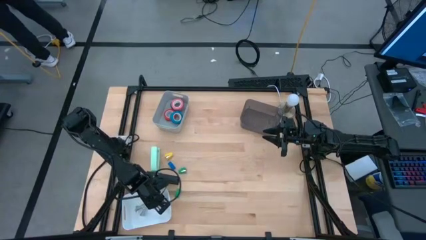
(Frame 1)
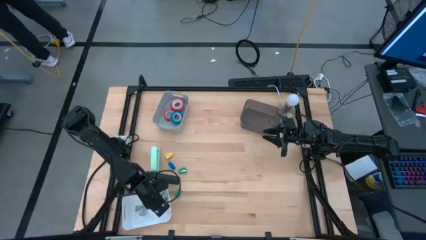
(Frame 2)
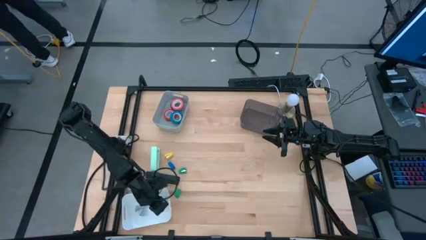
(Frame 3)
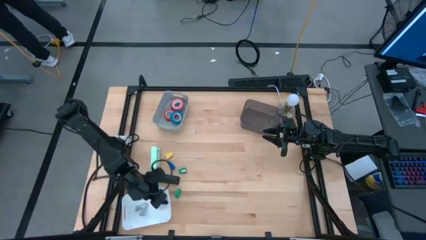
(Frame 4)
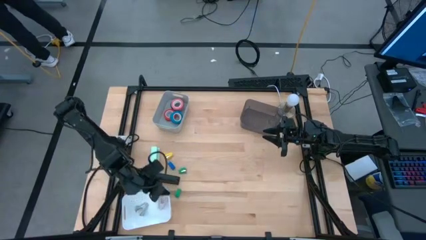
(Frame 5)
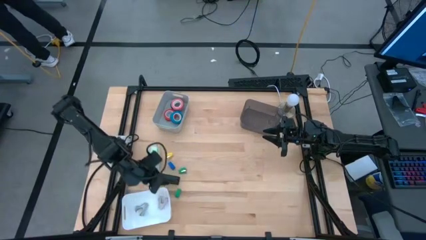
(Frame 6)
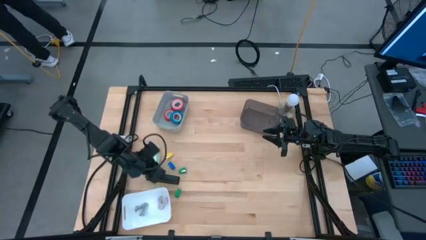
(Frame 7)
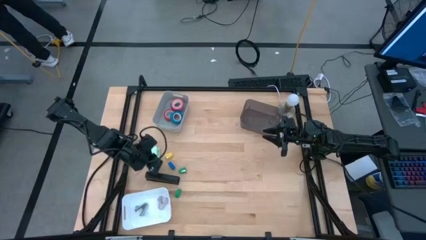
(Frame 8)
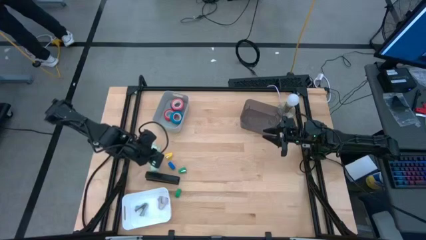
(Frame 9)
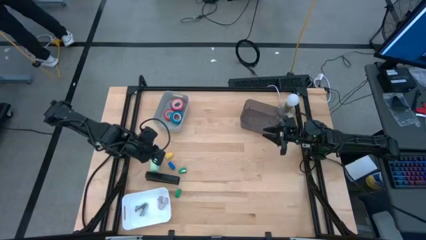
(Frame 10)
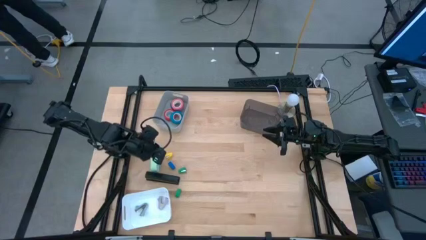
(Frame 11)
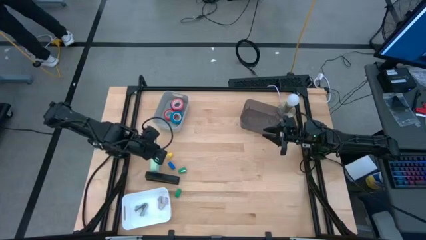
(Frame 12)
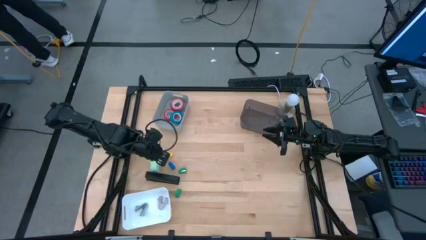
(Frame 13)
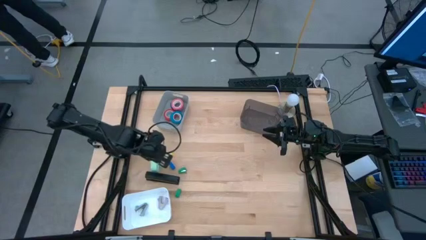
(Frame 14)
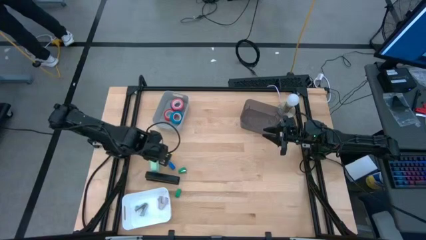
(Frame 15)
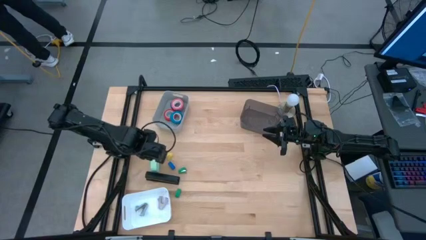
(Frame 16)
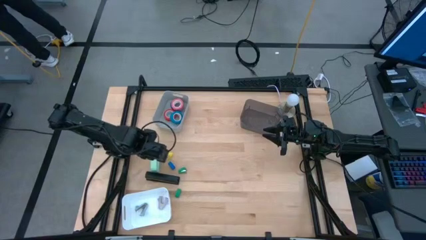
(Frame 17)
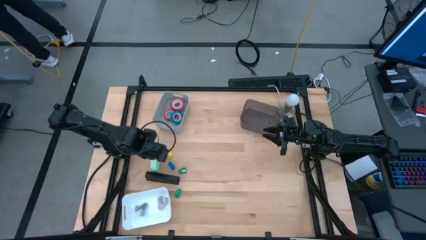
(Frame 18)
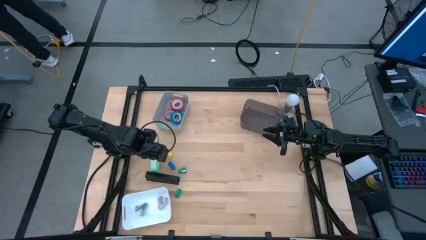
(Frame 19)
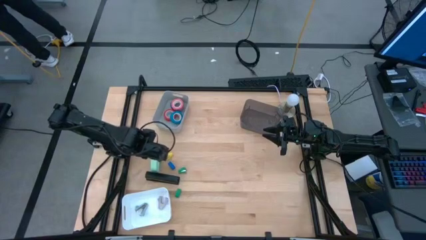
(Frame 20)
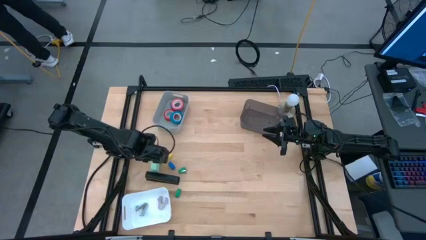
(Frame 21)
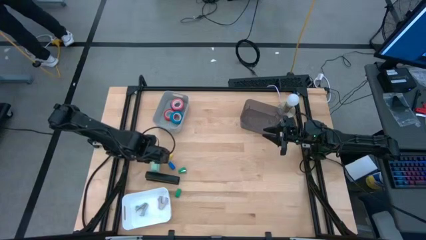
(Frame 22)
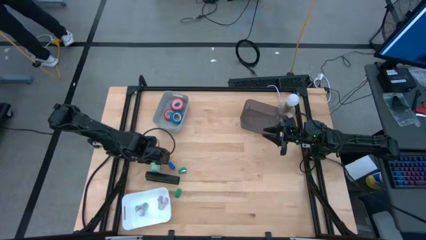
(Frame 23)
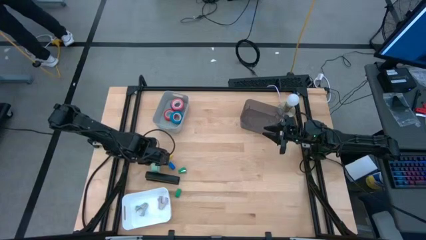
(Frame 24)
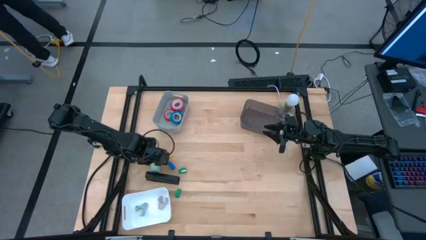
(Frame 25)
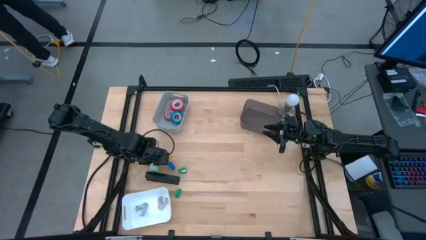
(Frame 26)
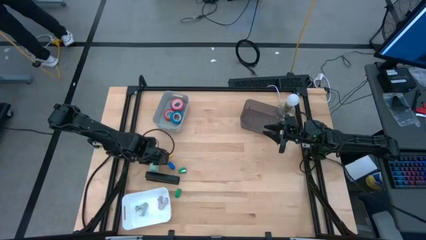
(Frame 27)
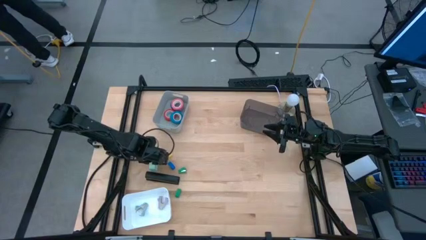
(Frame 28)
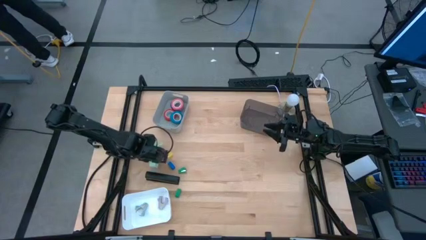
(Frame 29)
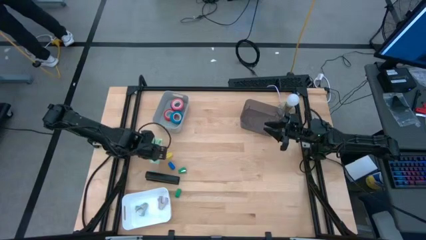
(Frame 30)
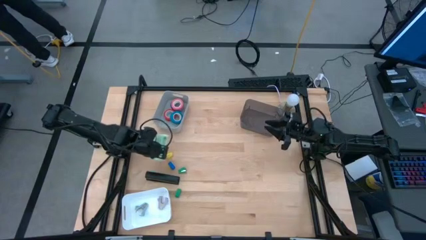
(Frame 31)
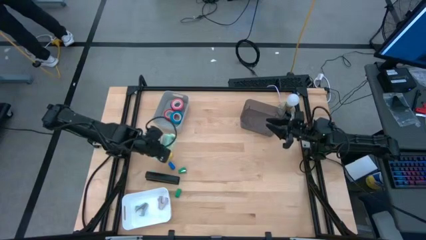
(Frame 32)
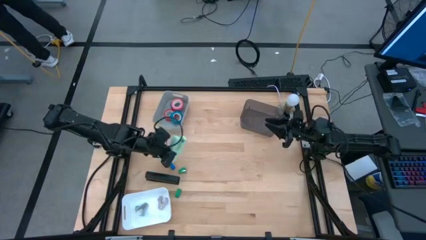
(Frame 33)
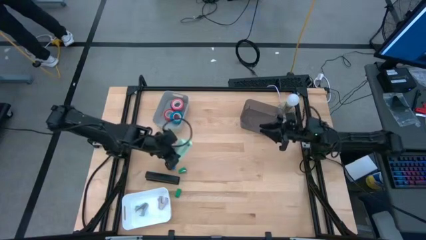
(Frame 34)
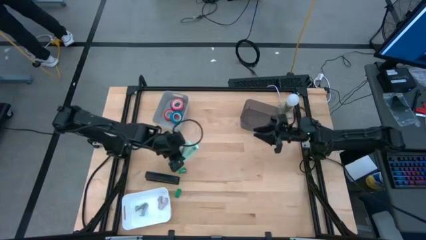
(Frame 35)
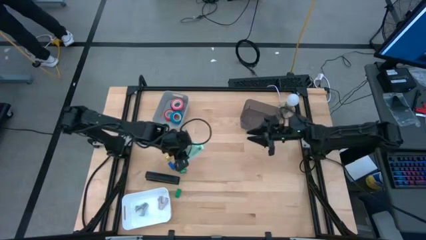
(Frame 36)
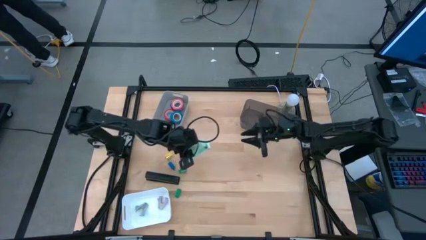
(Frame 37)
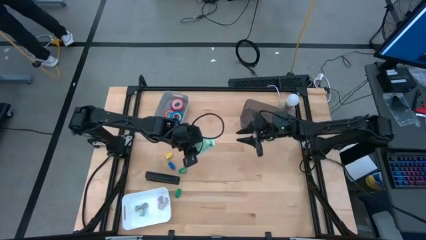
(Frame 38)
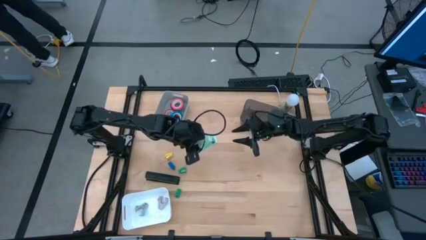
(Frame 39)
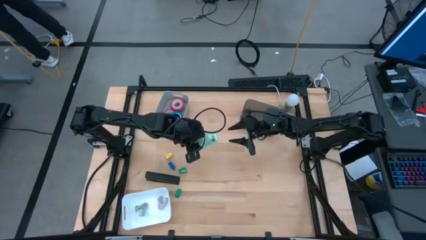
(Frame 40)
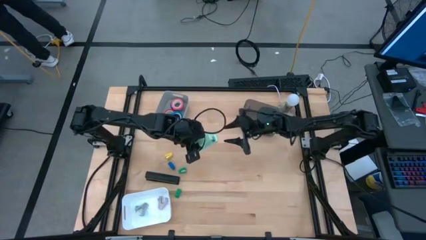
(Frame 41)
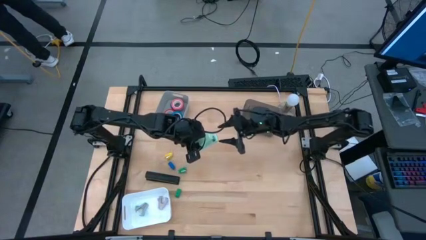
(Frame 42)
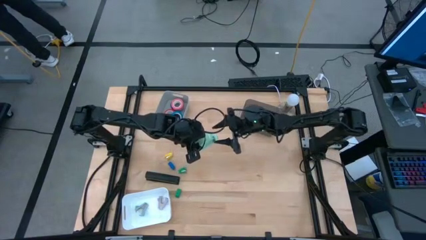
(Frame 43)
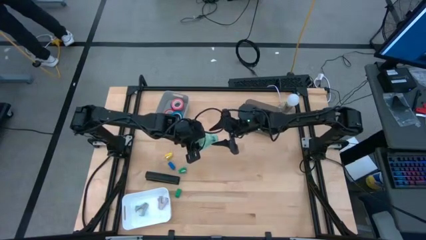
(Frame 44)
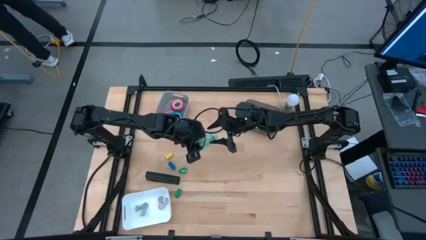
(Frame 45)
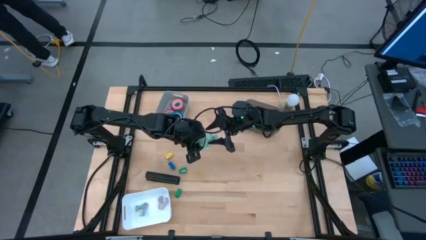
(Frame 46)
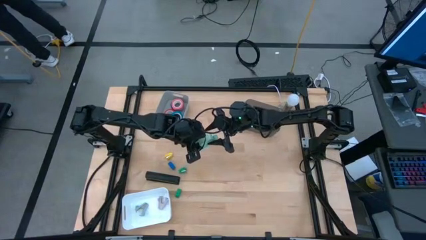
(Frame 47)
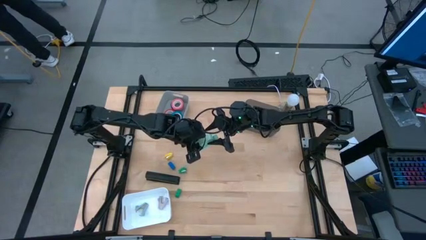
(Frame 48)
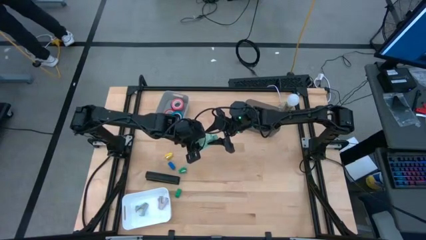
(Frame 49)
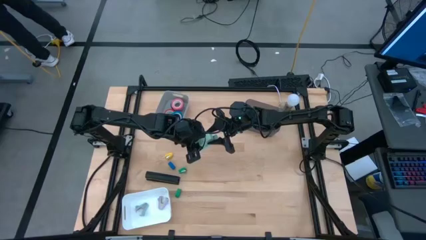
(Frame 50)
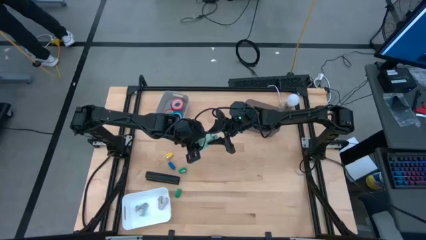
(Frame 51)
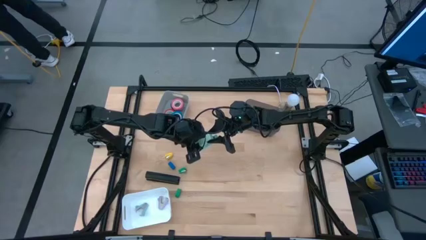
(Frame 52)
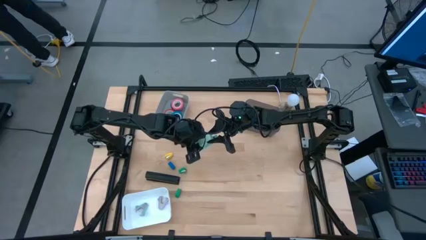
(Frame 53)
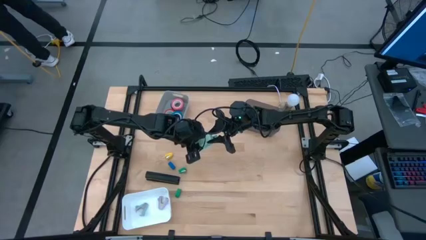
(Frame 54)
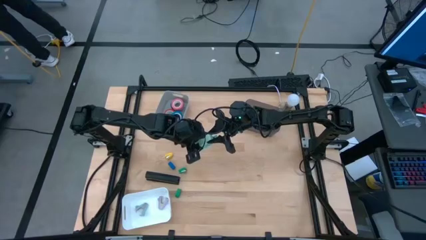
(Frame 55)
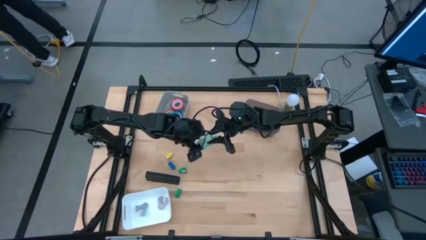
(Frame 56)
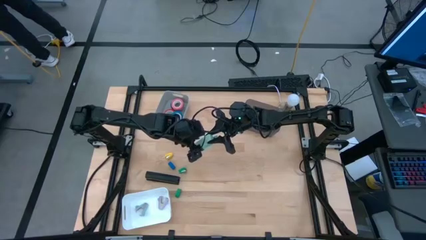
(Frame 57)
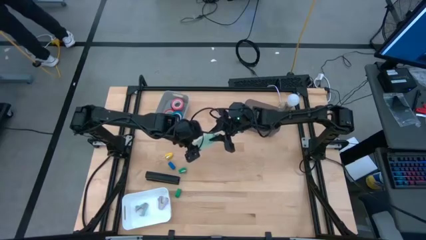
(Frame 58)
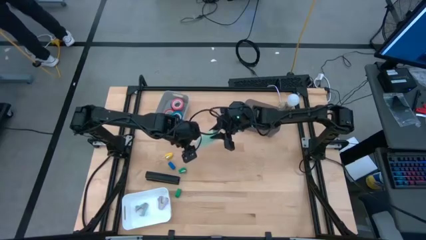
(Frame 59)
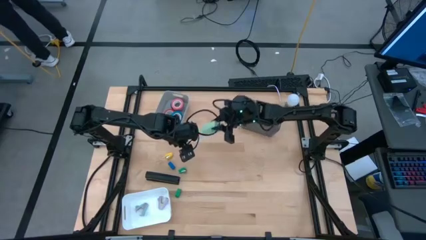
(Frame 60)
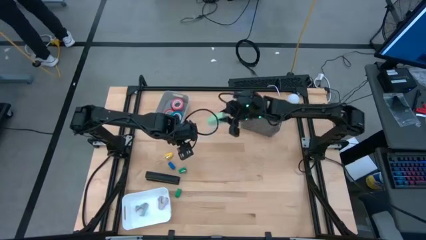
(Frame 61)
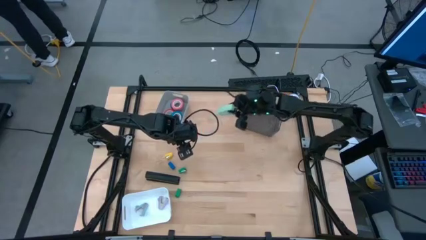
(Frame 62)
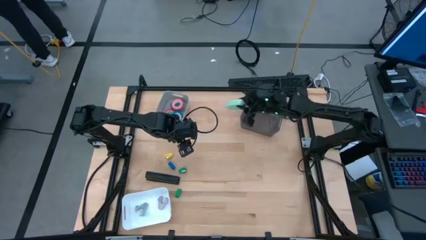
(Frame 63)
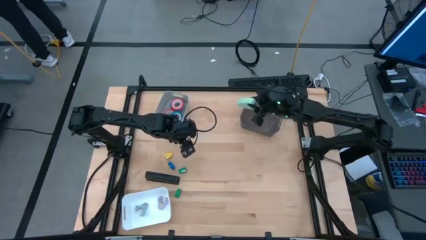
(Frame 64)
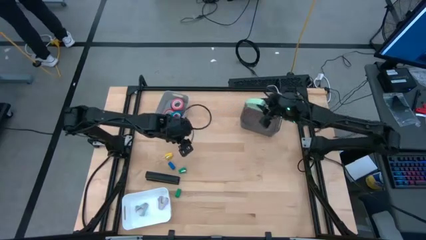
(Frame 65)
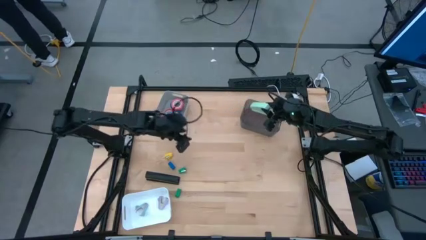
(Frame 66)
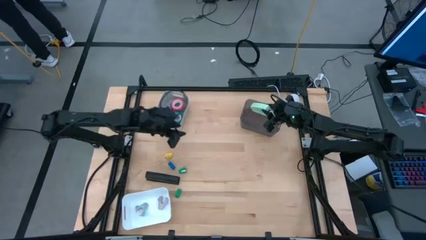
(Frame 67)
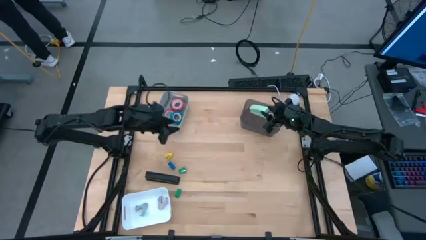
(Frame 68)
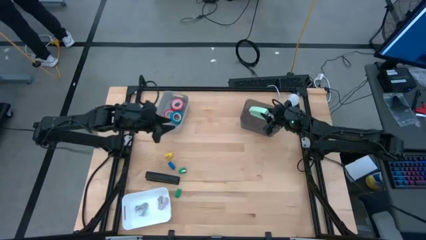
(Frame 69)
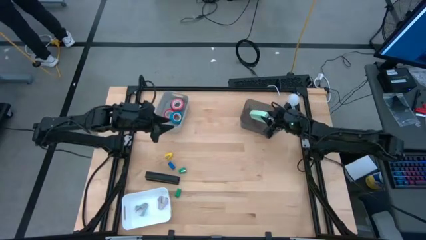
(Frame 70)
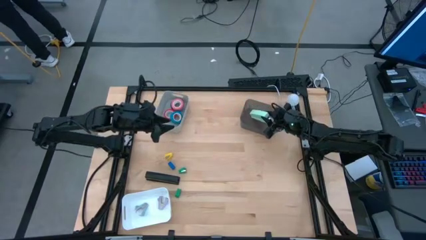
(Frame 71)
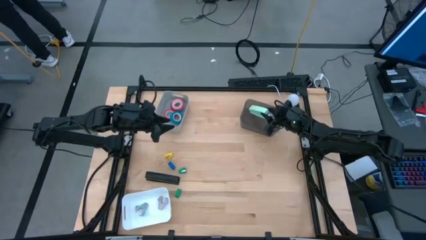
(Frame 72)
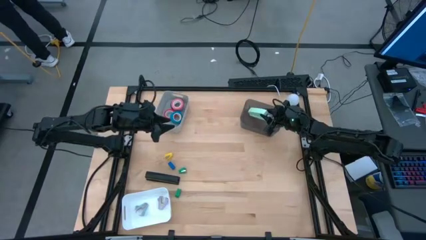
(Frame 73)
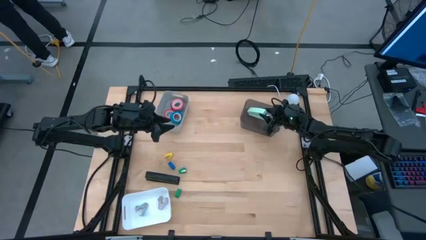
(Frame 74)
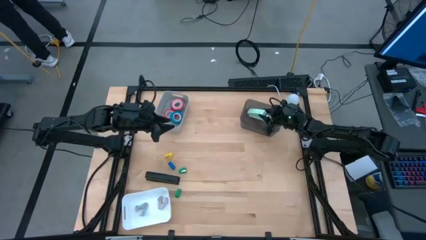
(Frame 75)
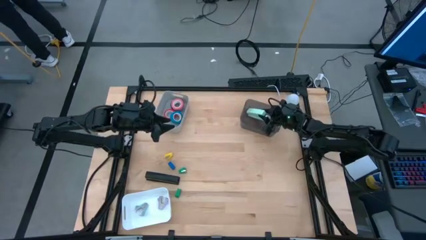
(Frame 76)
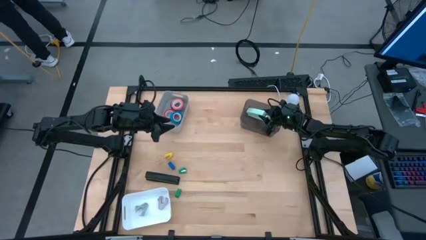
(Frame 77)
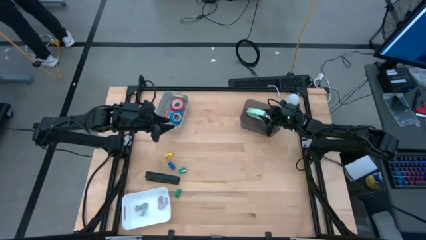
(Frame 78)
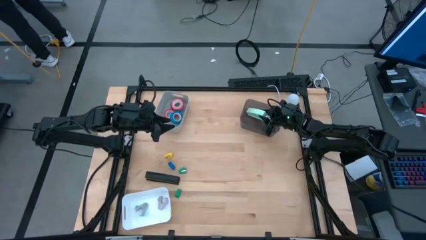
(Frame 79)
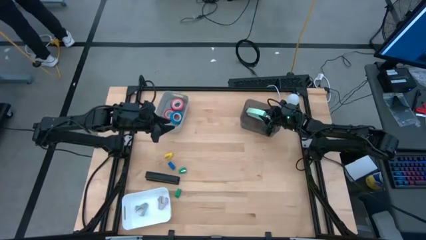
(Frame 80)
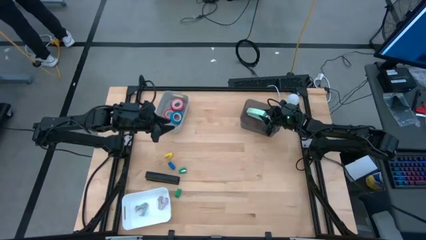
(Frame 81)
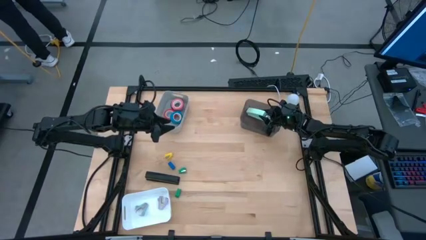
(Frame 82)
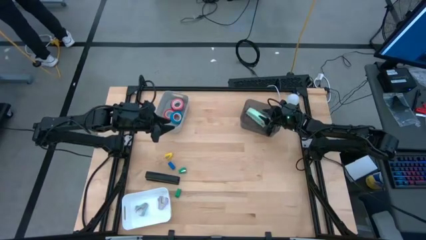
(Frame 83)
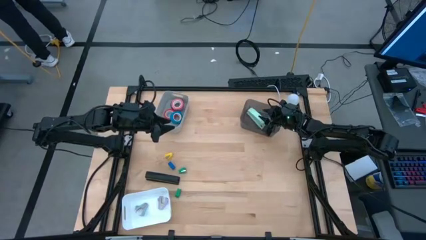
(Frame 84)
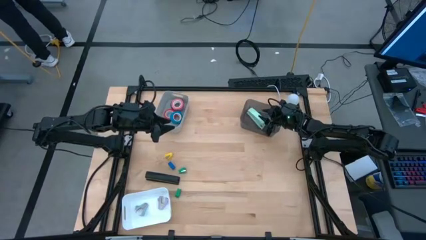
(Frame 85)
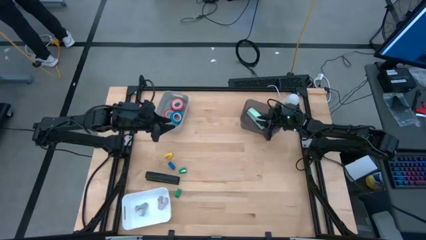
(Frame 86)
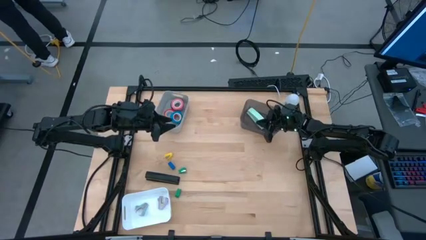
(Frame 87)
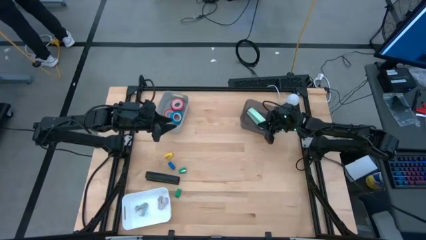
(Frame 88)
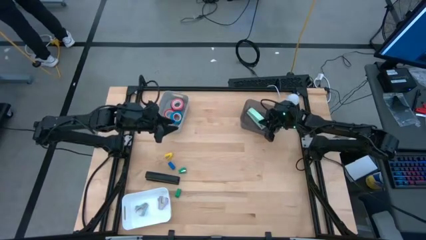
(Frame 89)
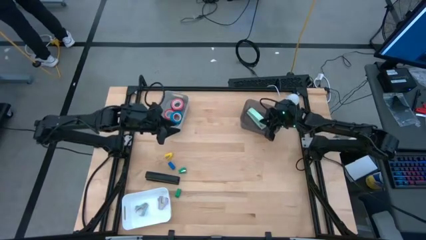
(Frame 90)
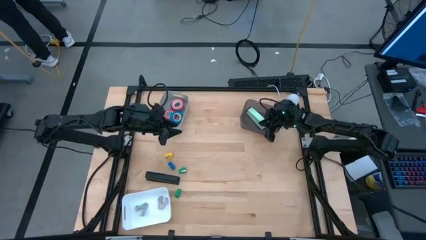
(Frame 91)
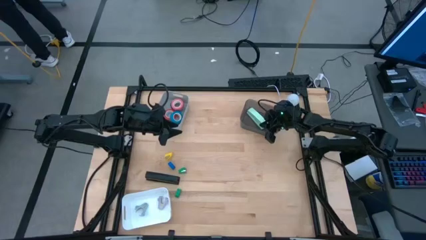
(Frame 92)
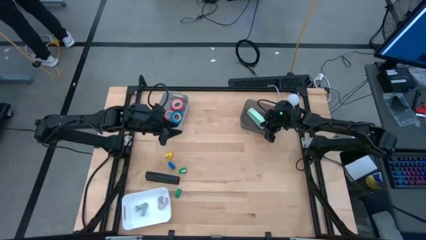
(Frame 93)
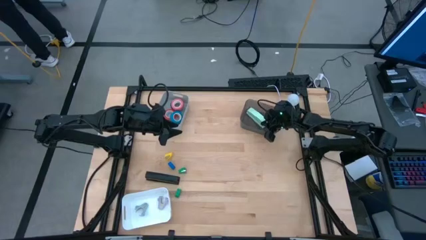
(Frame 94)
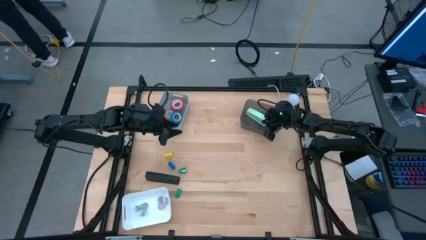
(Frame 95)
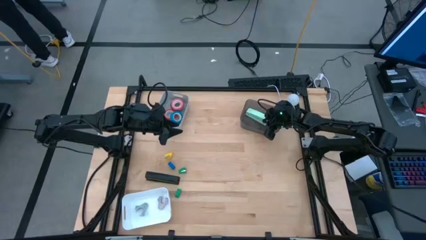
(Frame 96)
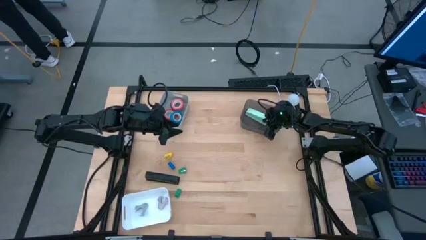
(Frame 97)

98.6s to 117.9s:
Task: Pick and place Stapler, Stapler remover, tape
Put the light green stapler into the black bin
